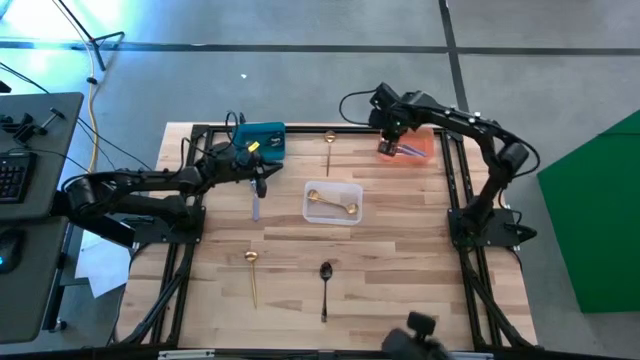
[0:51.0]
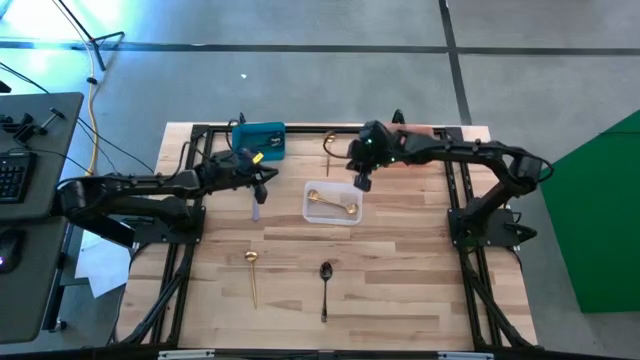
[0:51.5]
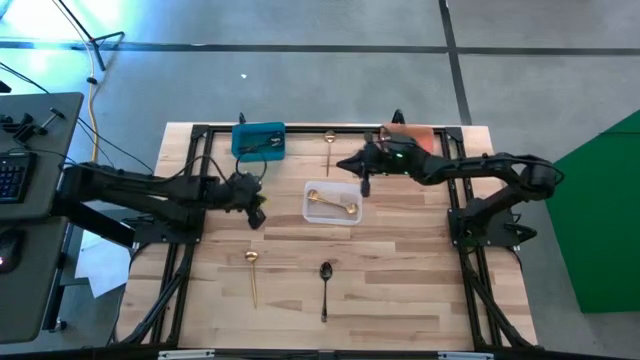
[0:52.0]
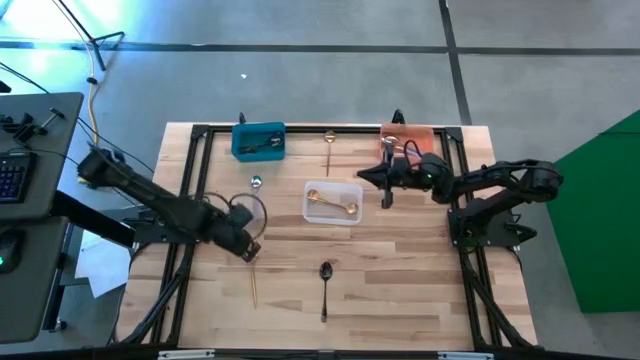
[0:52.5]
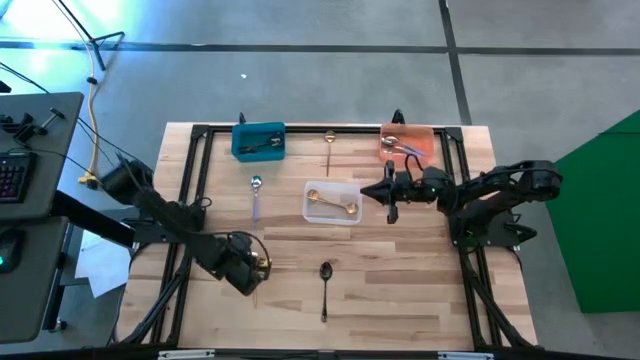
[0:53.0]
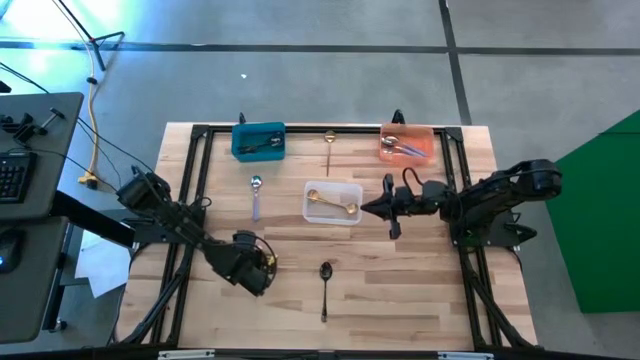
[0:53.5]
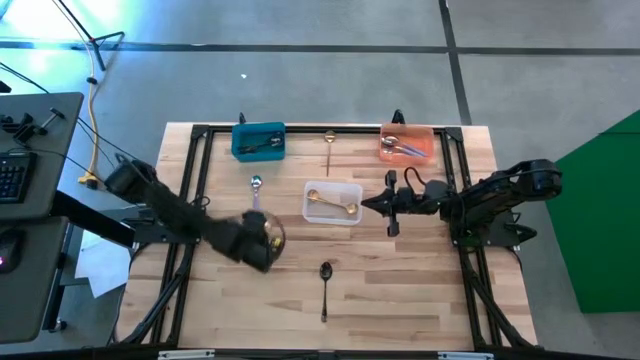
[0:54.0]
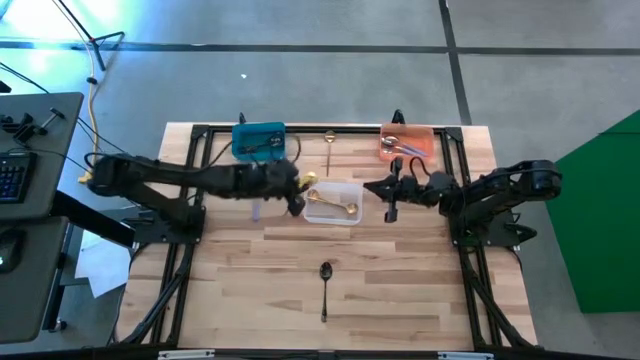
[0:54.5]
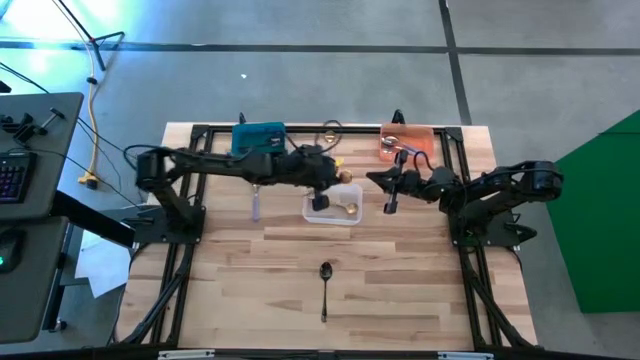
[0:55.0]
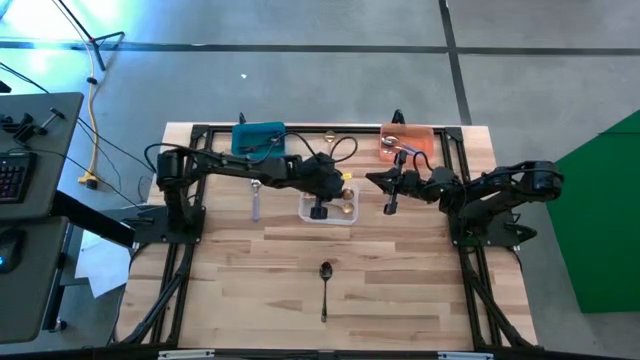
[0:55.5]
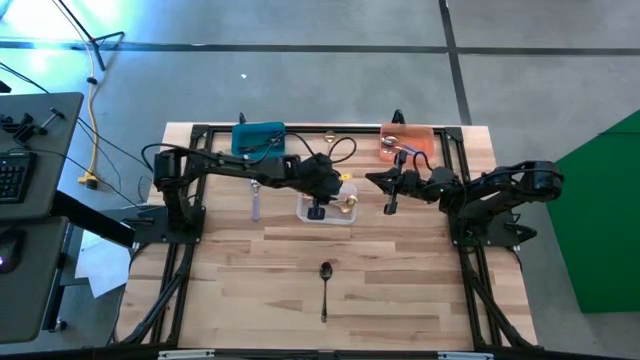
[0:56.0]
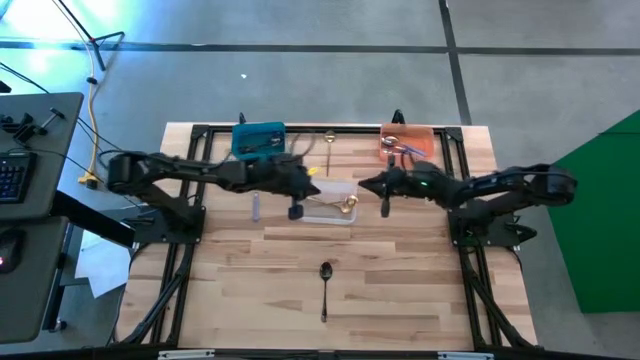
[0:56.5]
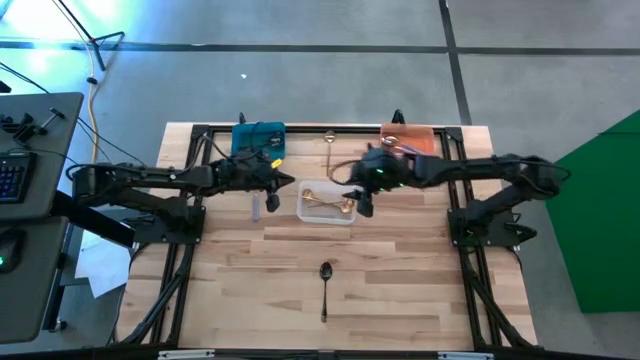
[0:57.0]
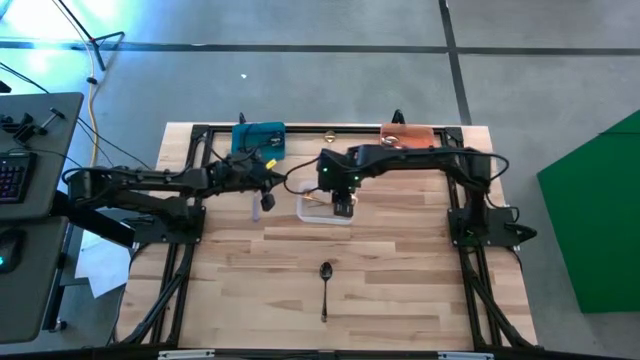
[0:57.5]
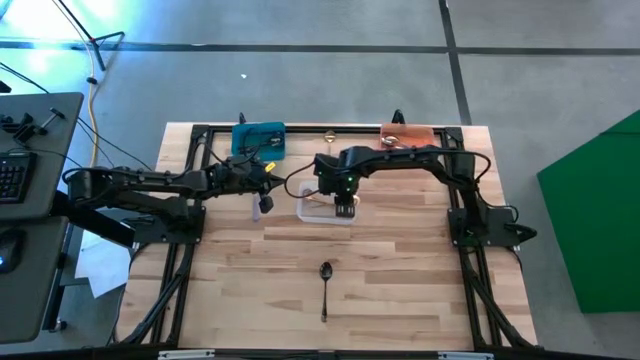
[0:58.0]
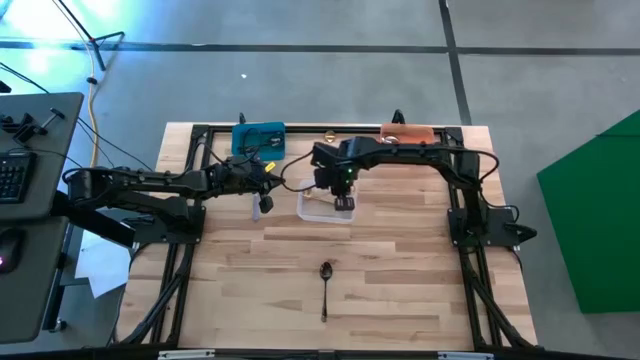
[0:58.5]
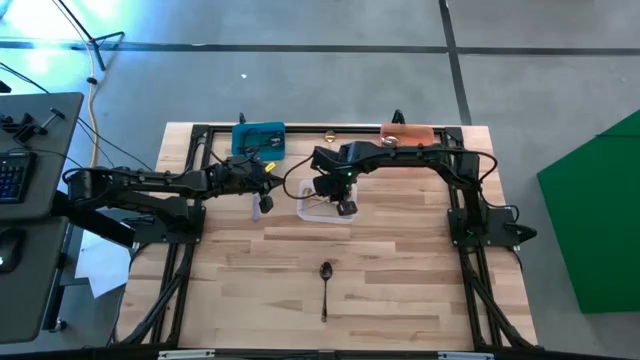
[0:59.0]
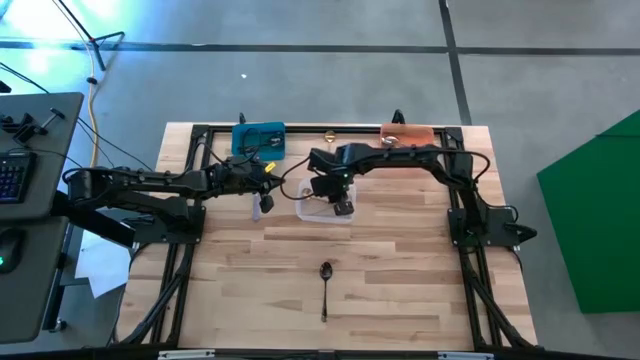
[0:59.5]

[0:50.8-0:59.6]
Task: Sort silverware by color (type)
Put the golden spoon into the white bin

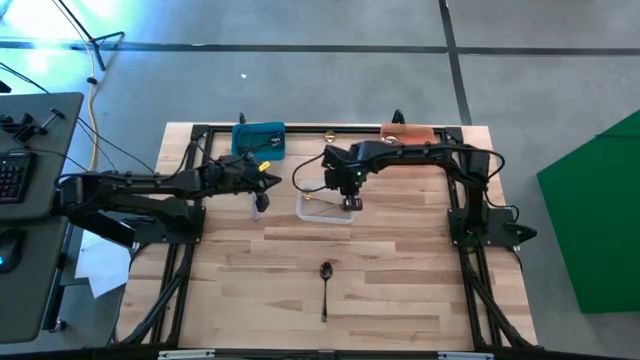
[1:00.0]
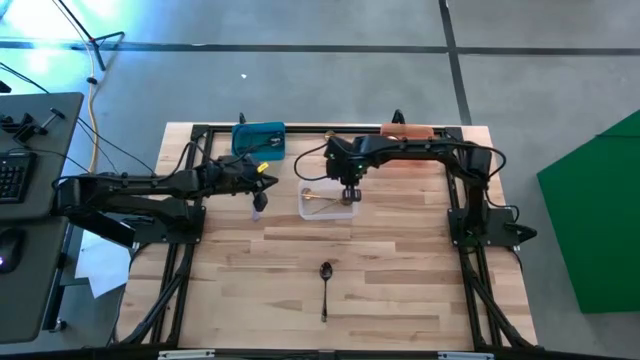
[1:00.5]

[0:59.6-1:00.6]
Adjust the white bin

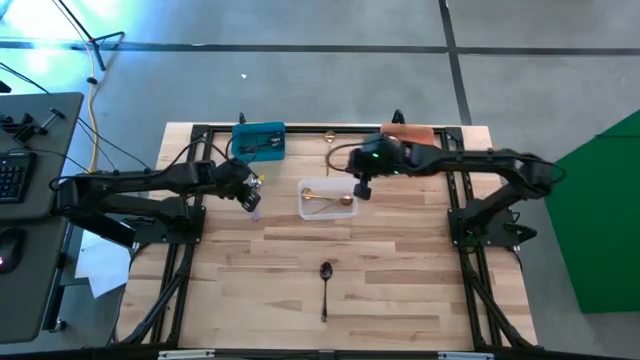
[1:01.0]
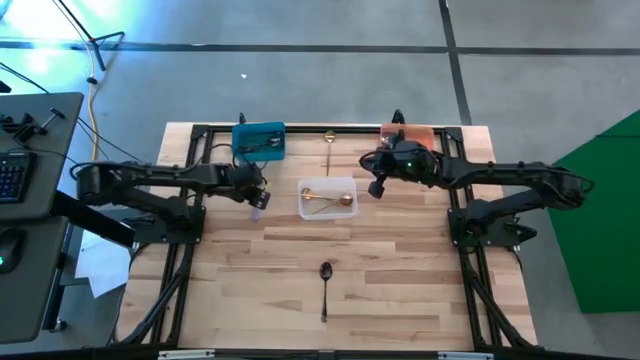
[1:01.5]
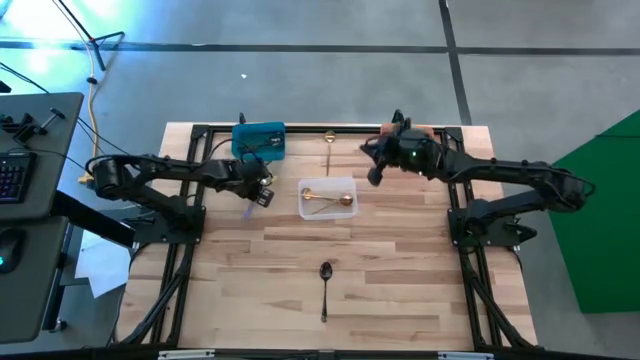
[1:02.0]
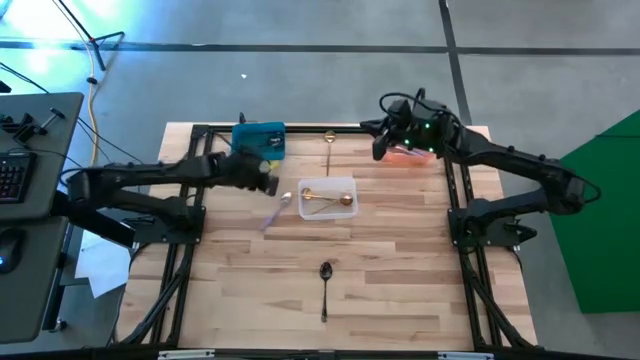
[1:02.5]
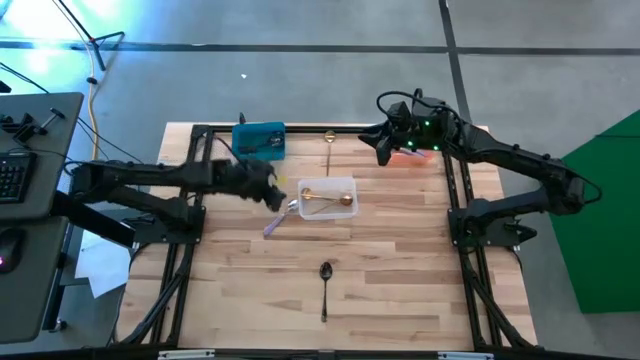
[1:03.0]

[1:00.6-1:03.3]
Put the purple spoon into the orange bin

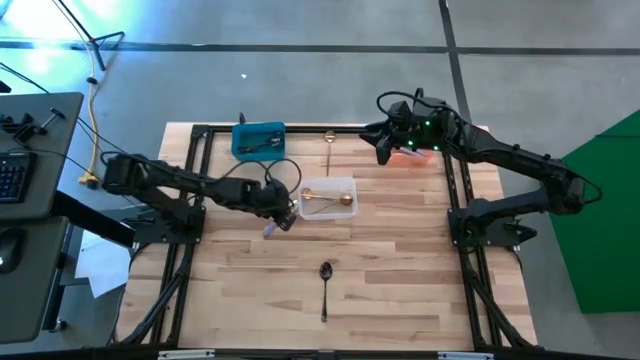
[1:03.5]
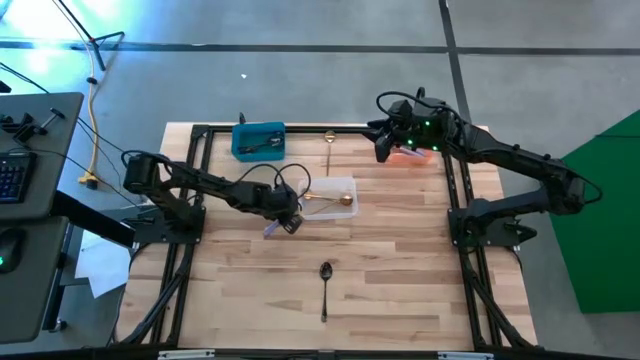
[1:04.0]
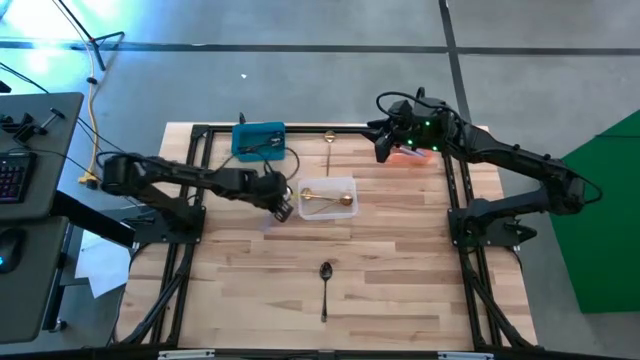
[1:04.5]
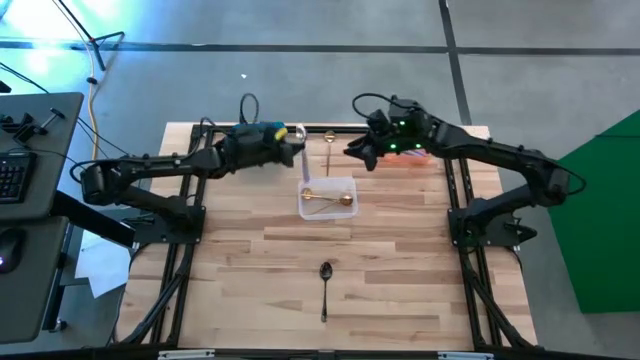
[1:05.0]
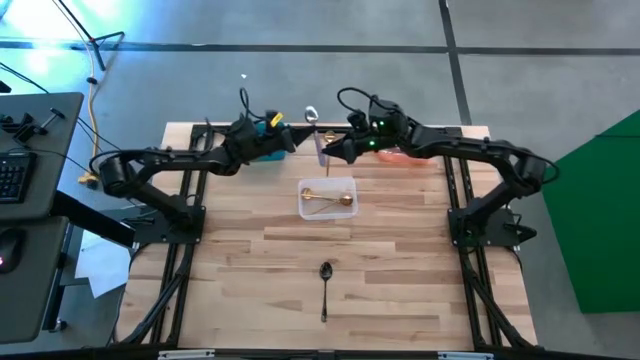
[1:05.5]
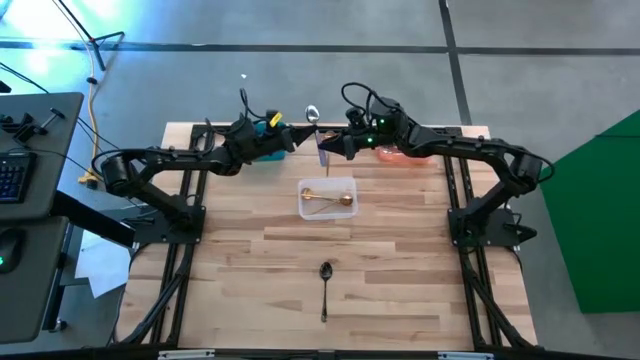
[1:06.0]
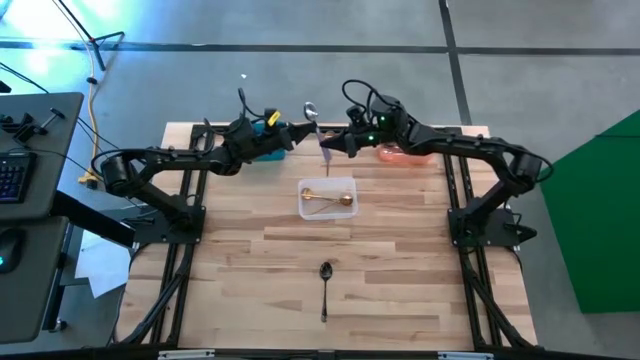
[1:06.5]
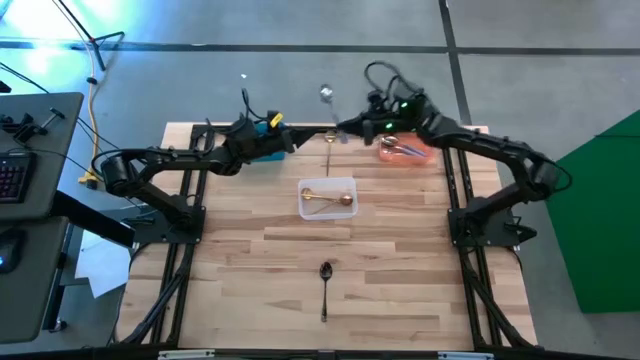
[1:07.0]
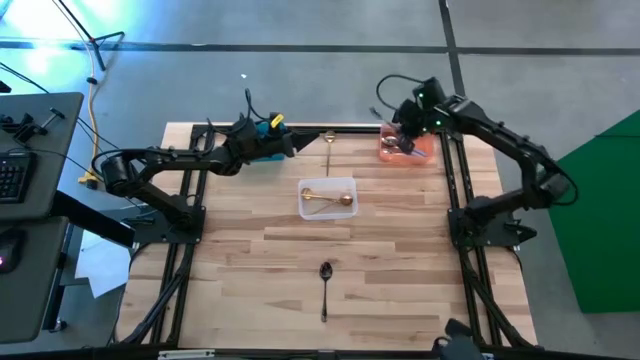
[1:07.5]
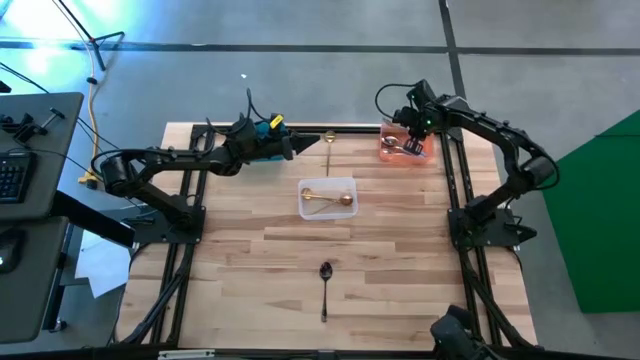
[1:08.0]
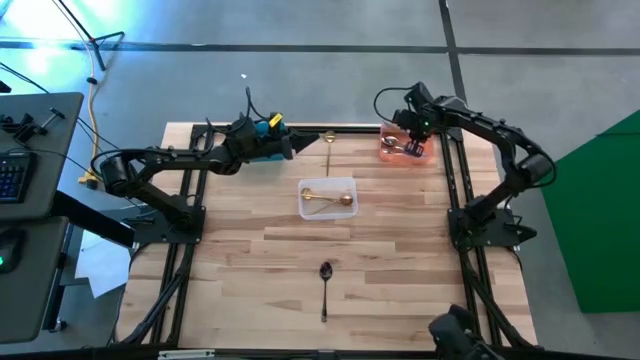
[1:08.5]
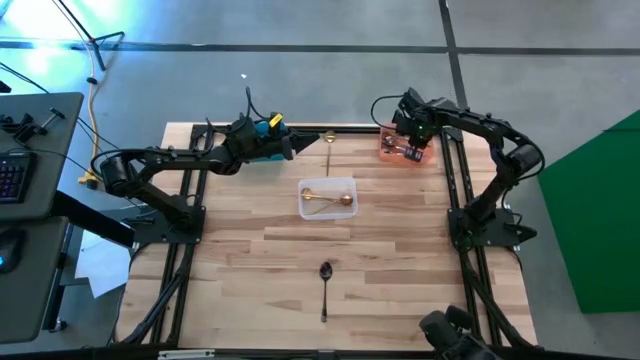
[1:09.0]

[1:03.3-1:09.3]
Put the purple spoon into the orange bin

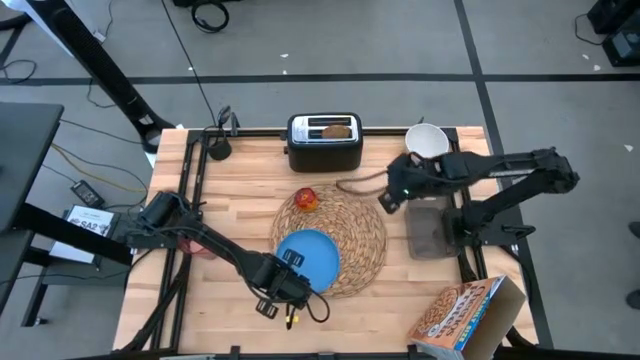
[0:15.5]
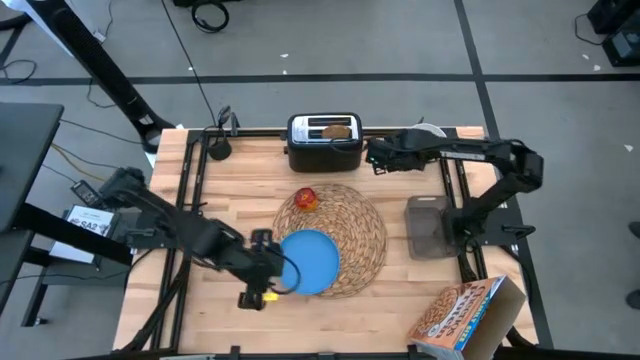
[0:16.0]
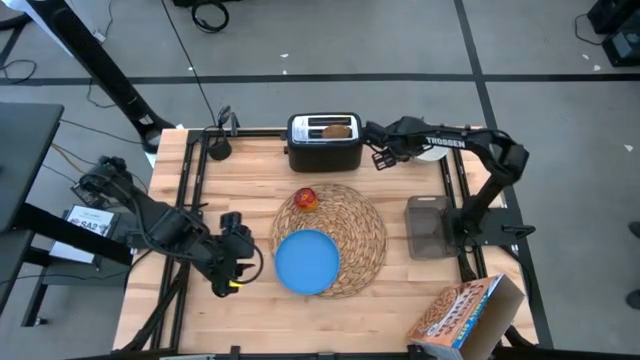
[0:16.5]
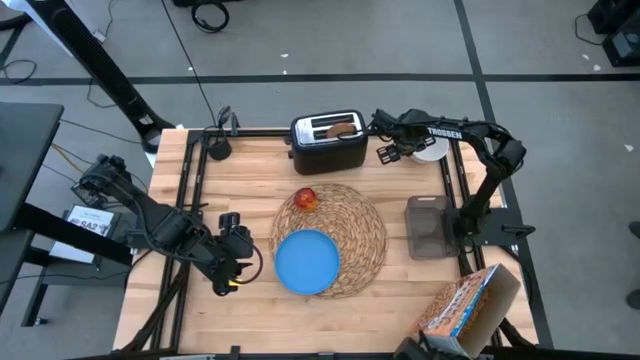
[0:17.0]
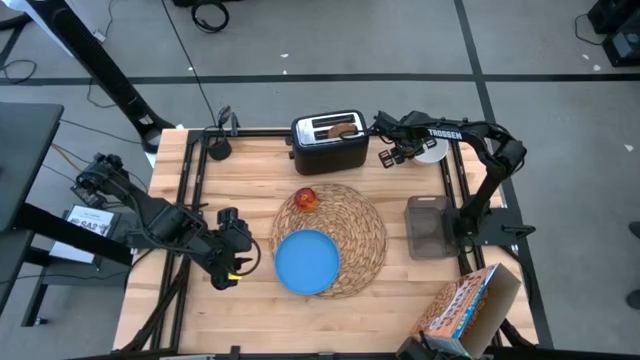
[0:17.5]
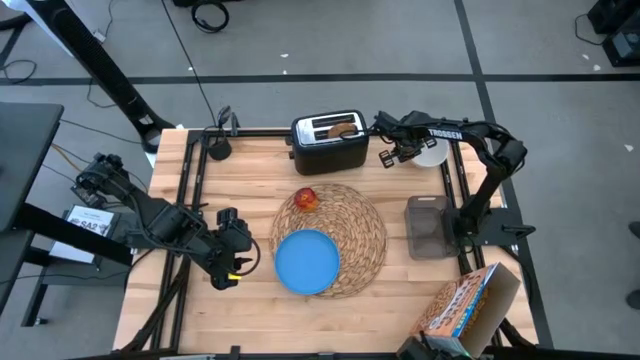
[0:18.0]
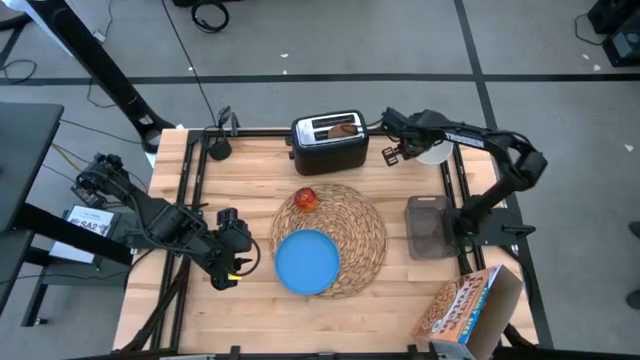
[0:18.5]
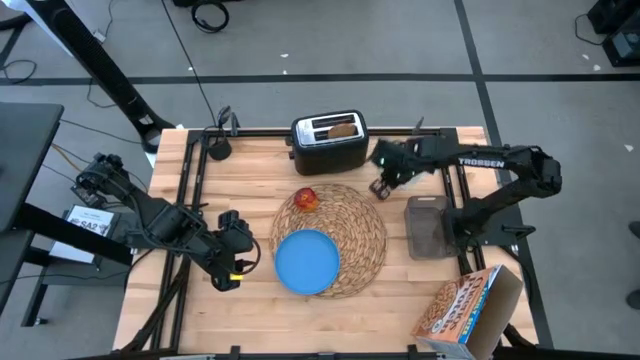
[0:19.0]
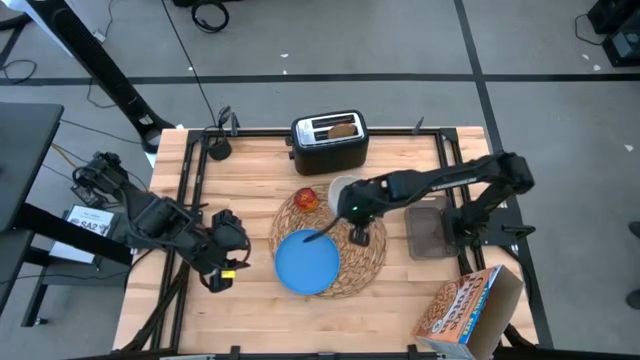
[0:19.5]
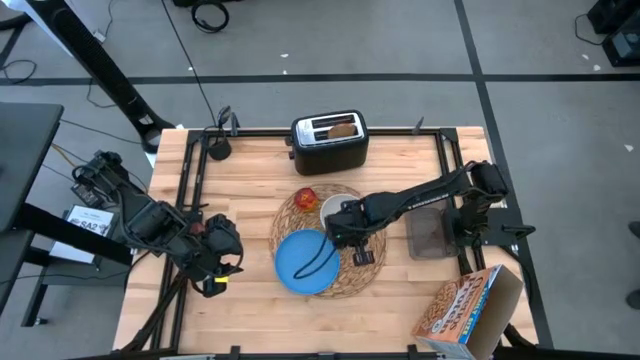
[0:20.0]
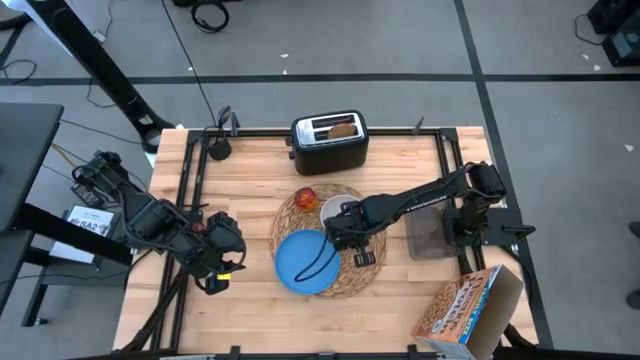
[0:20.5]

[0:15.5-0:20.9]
Task: Arrange a breakfast setting
Put the white bowl on top of the brown table mat to the top right of the blue plate
